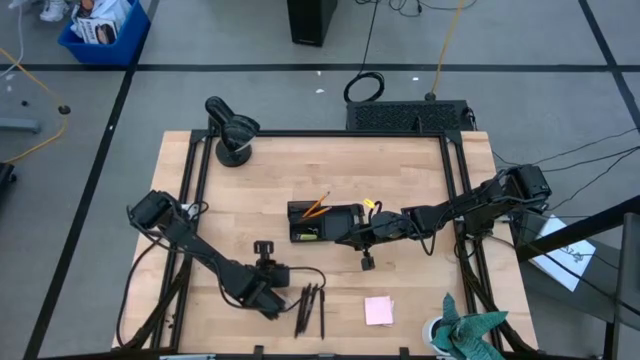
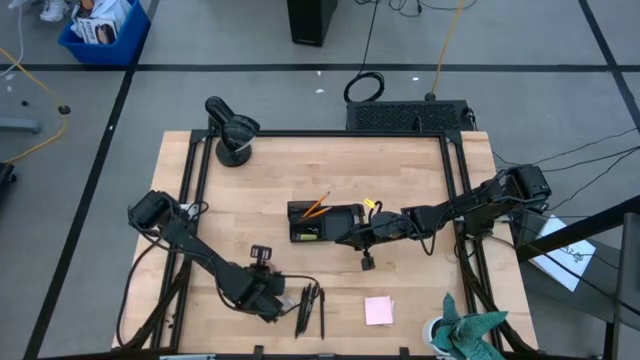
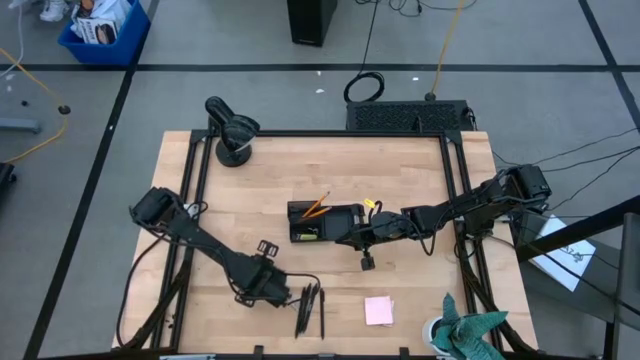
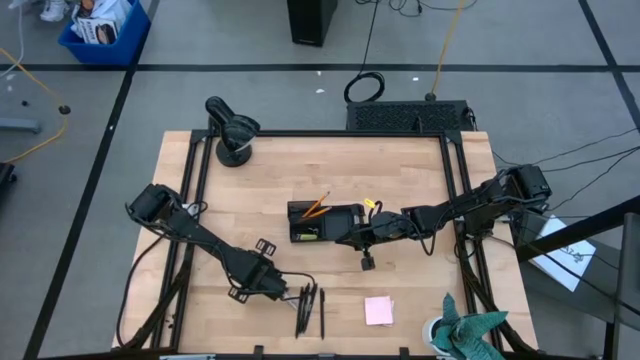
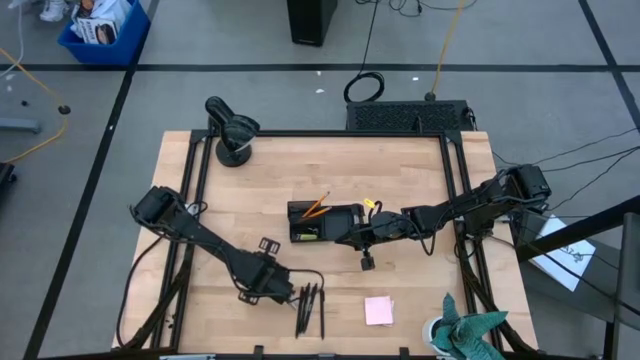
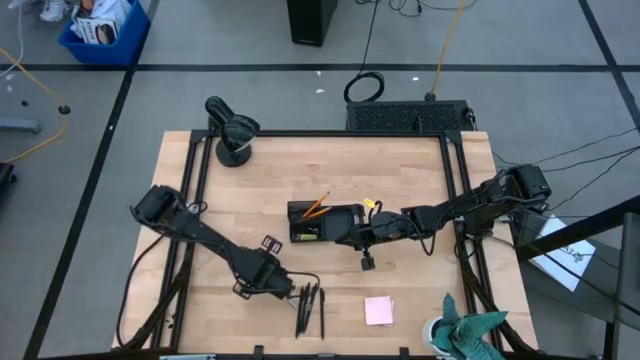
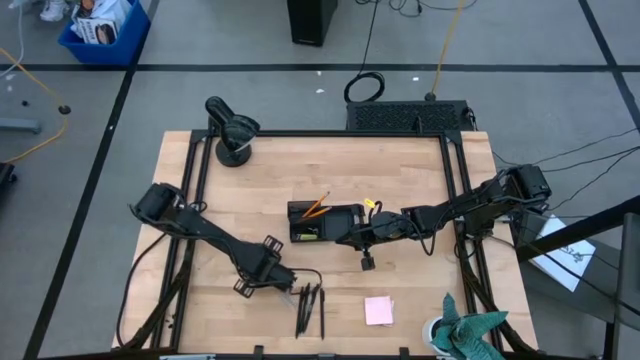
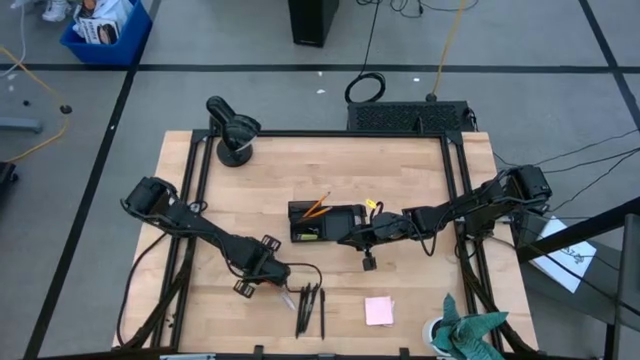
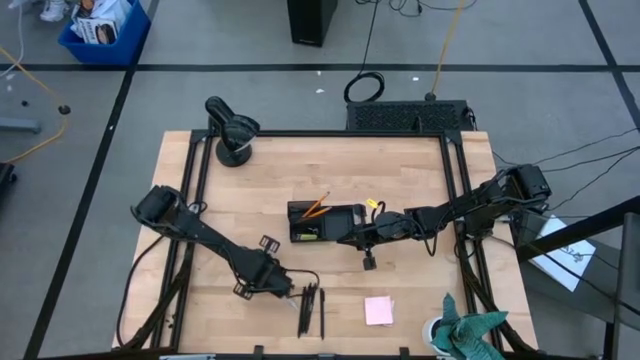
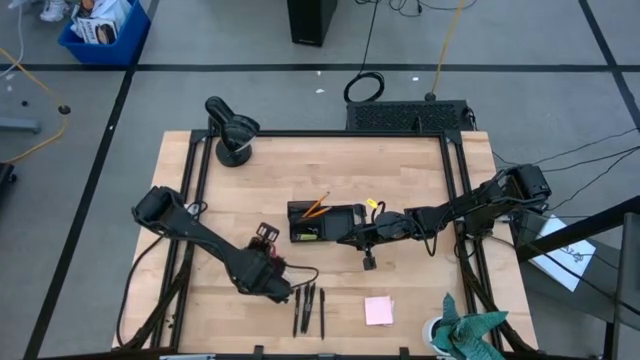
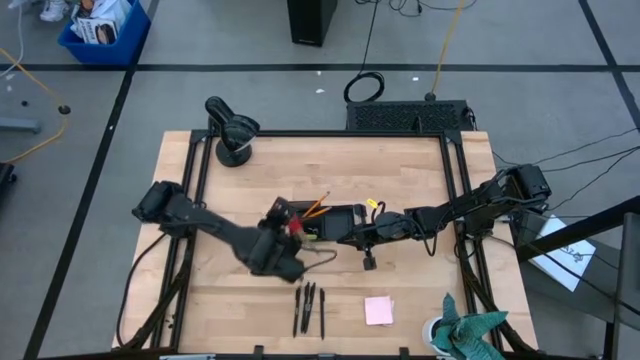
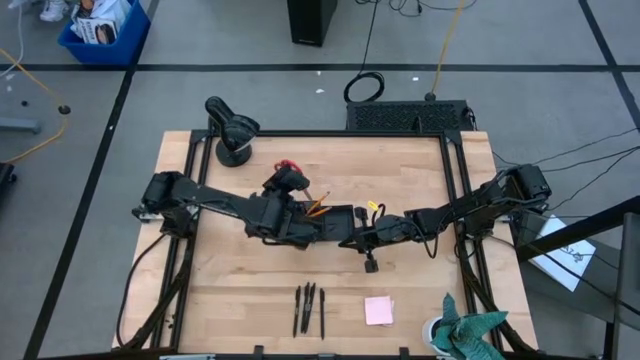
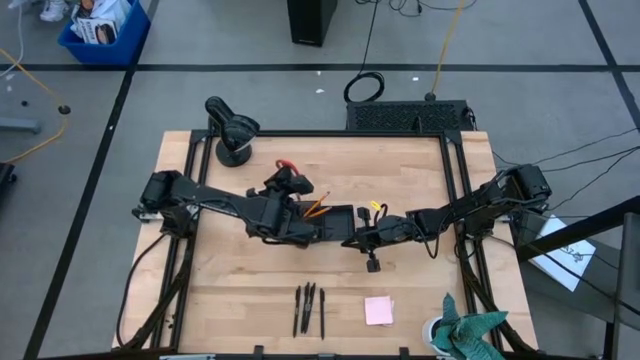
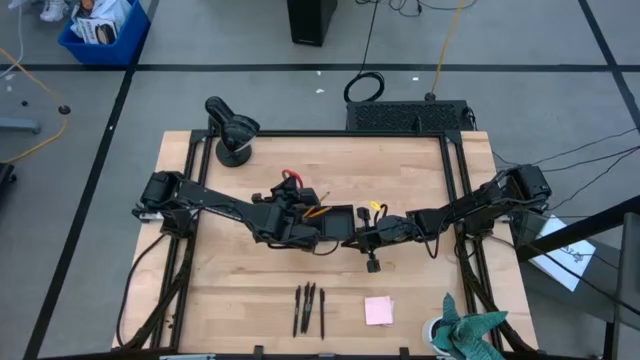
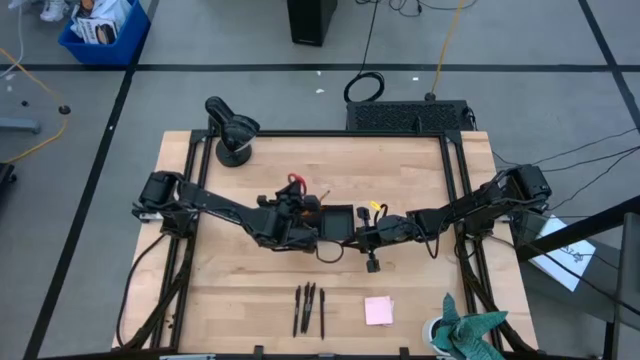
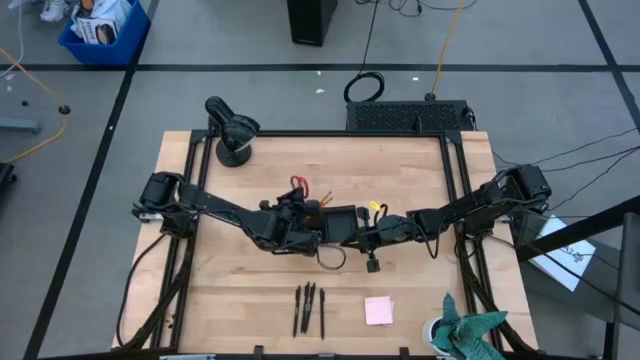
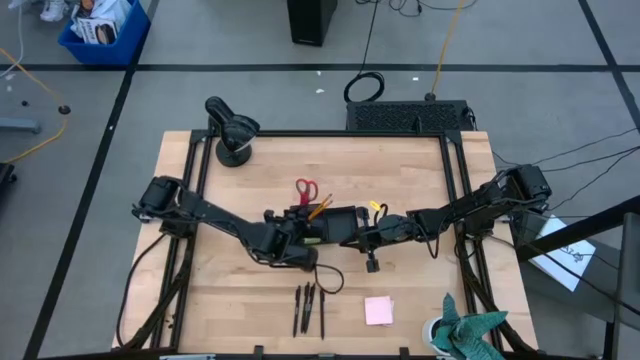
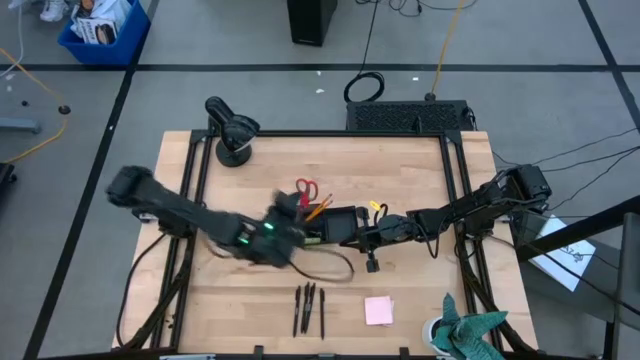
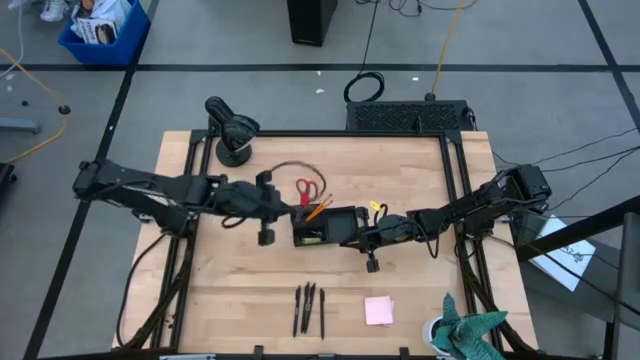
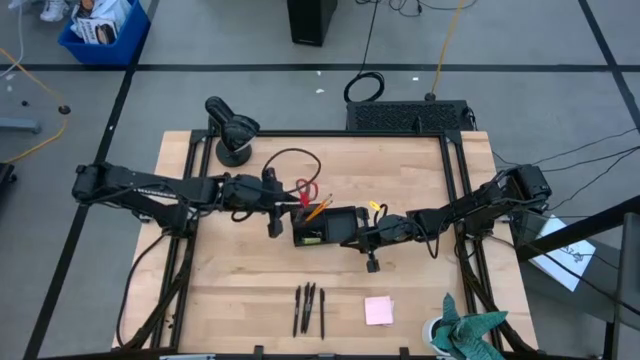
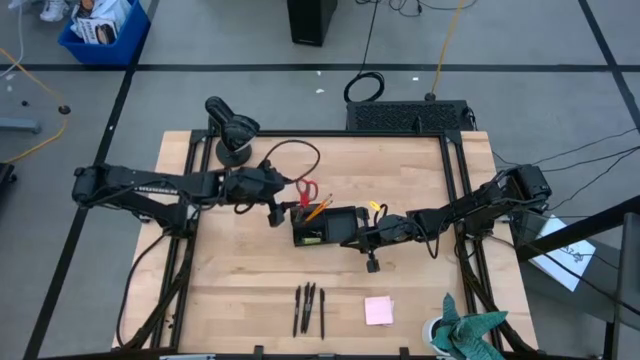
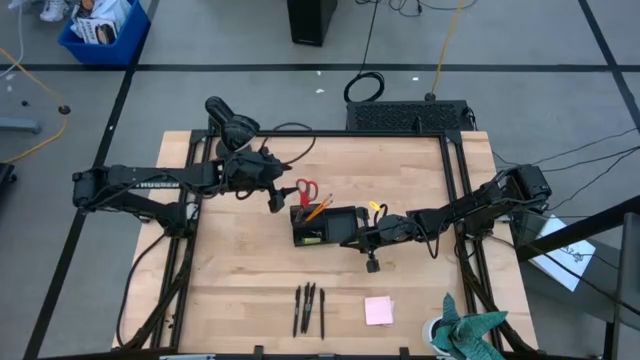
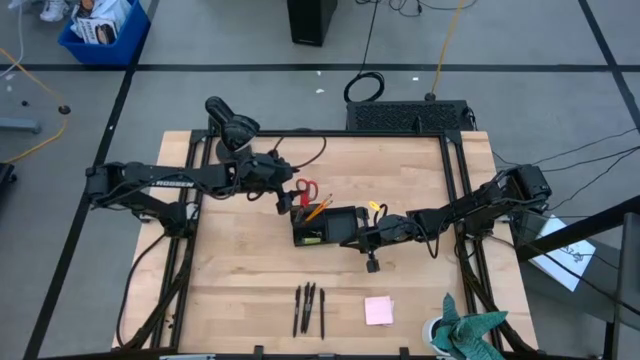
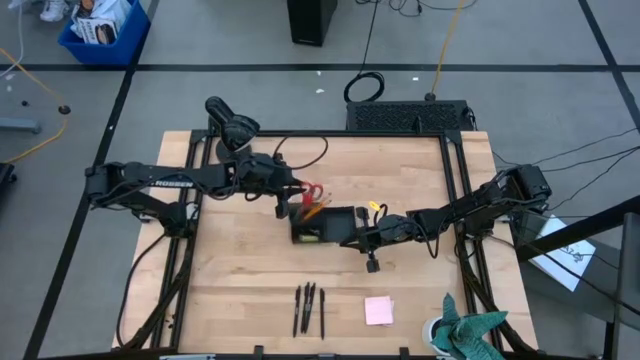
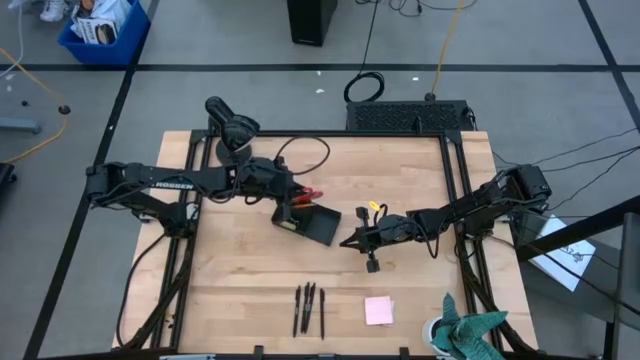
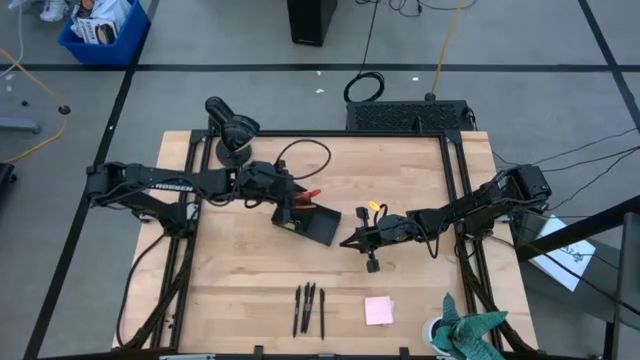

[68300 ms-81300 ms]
Task: Pick and place office supplies into organizer
Put the red scissor into the black desk organizer

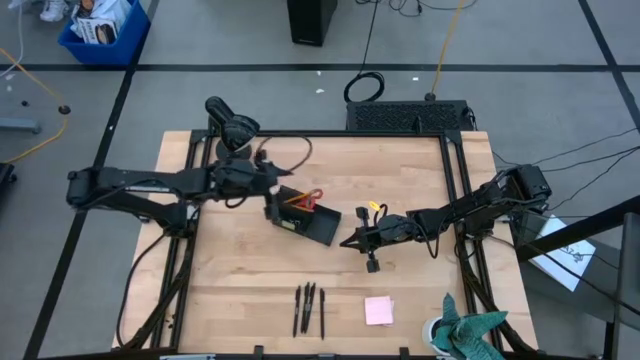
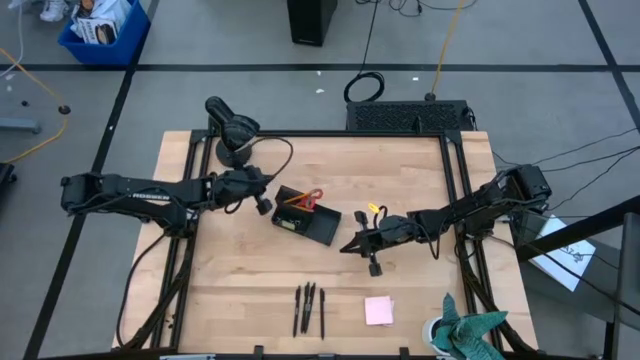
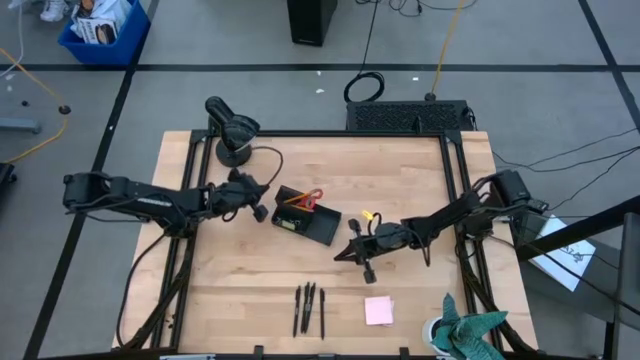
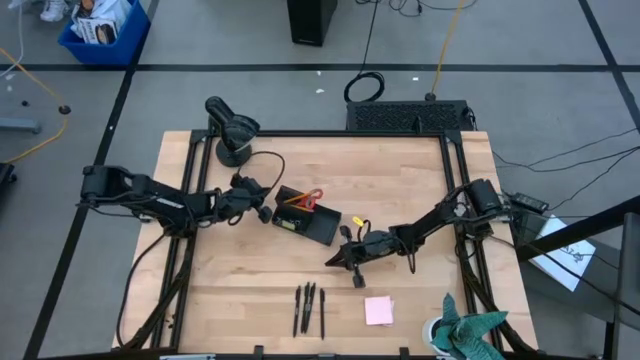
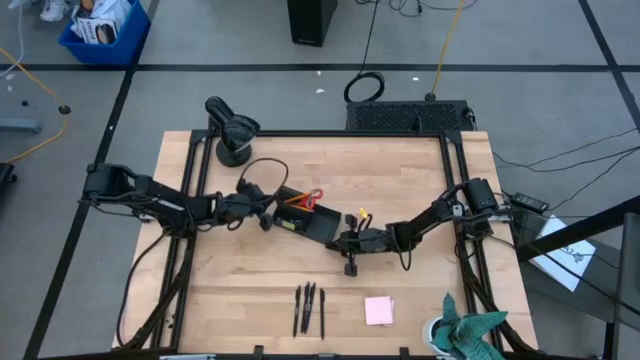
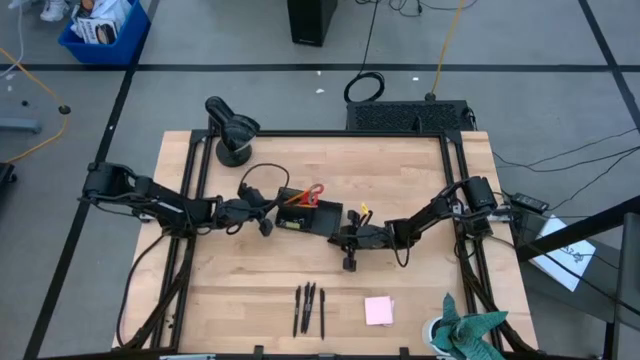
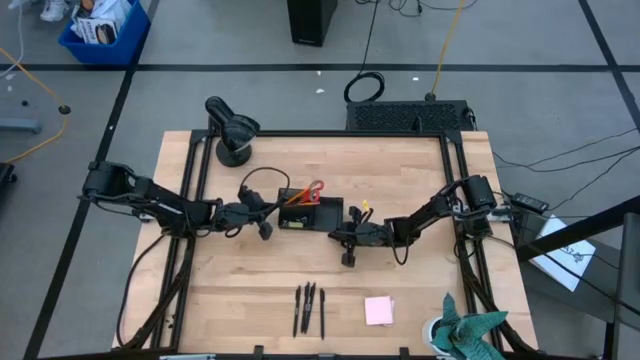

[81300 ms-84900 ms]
Adjust the black desk organizer
